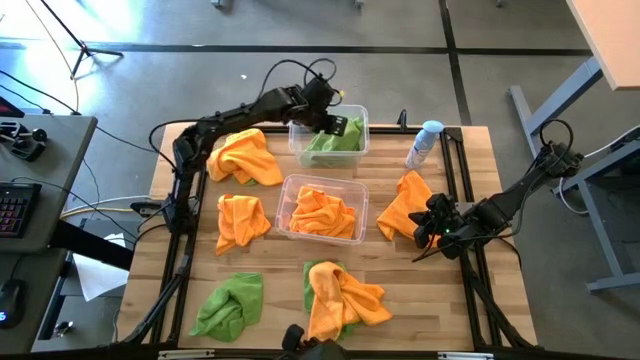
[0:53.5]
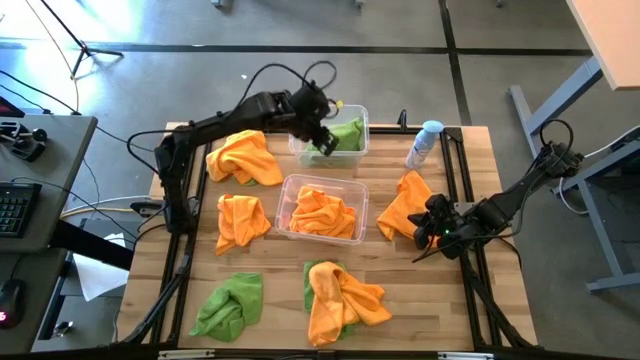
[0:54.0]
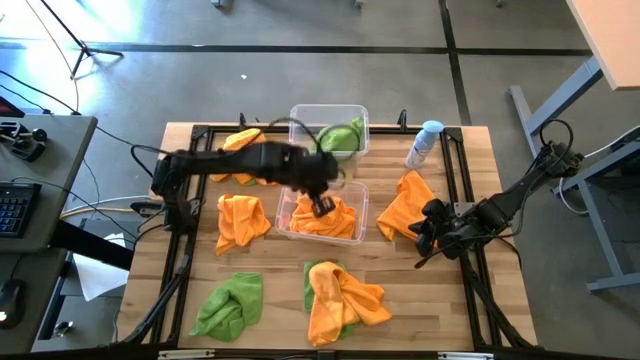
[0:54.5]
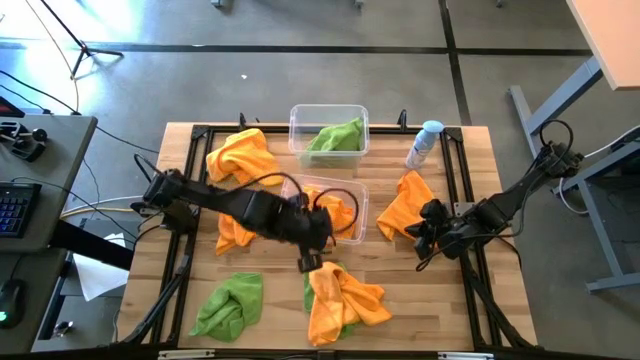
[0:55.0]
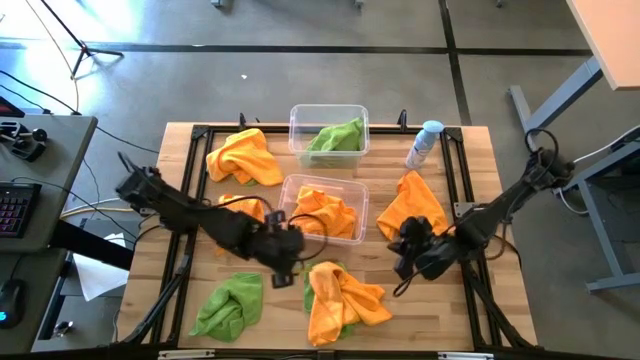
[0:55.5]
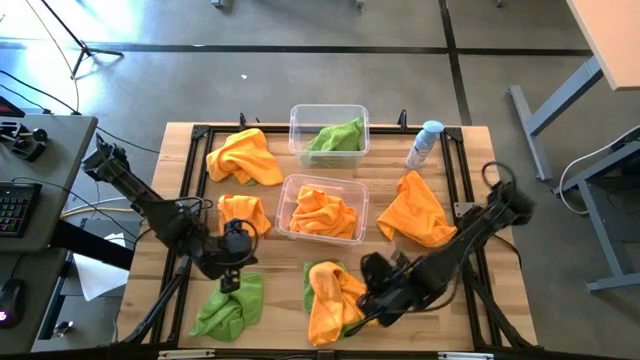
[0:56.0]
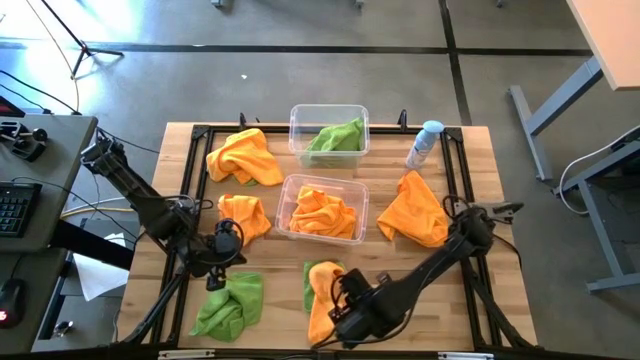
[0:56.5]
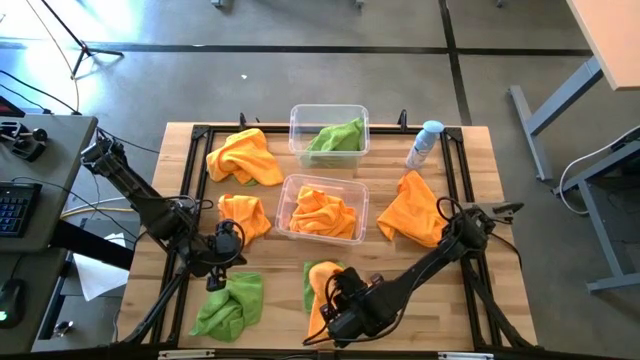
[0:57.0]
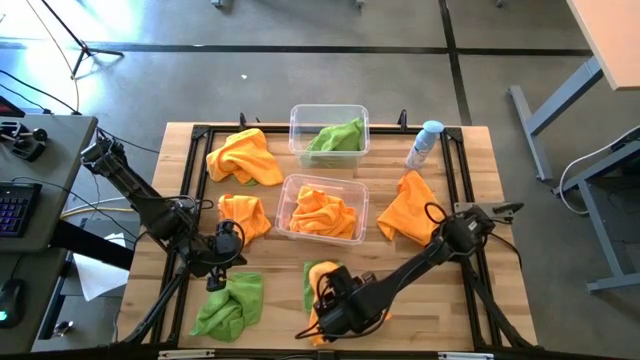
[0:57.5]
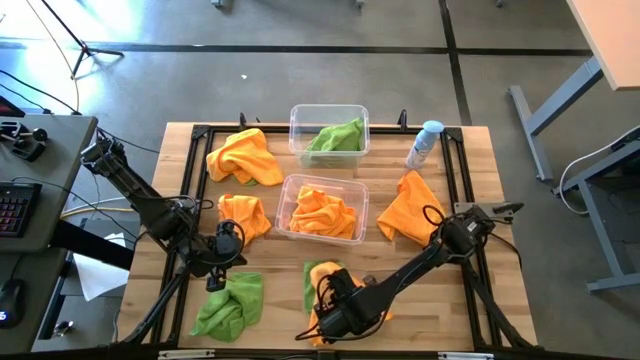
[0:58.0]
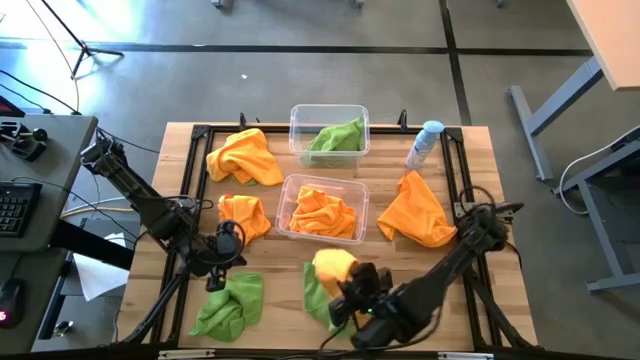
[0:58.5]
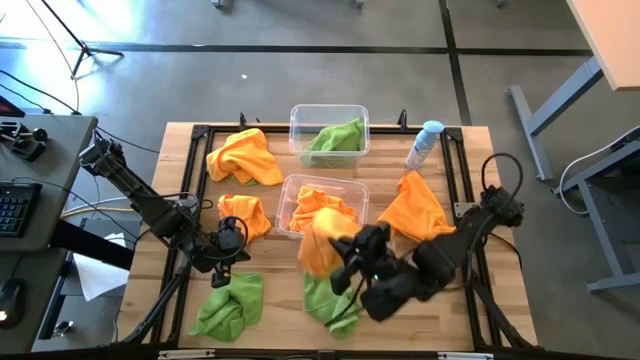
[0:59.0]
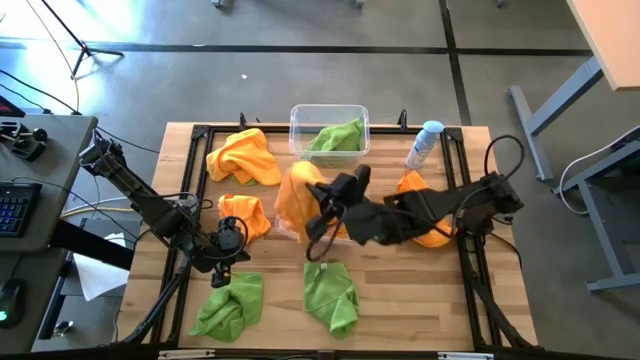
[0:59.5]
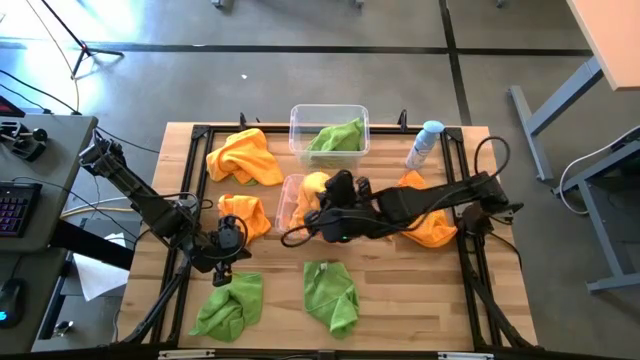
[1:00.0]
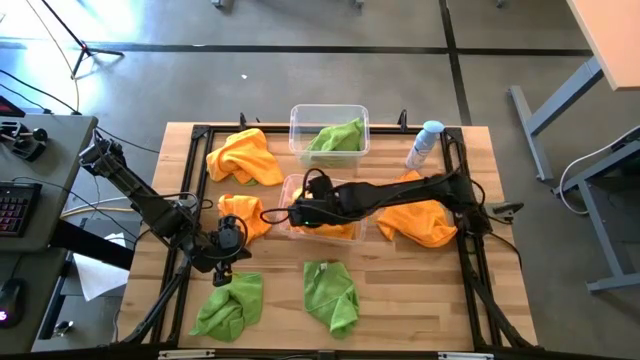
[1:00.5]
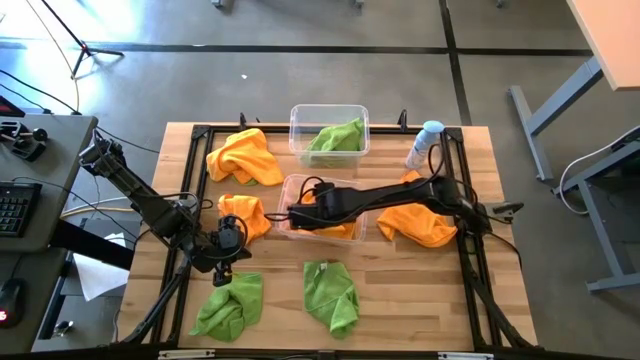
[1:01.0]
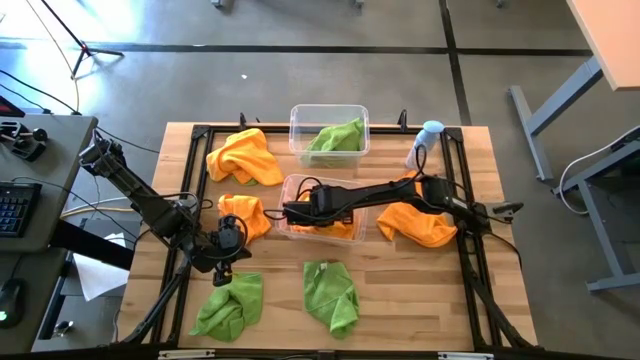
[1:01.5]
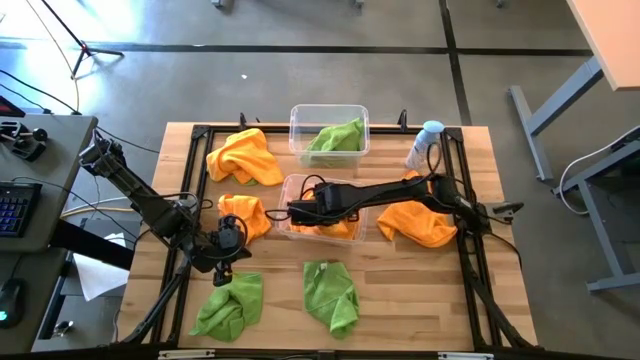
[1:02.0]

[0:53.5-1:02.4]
Task: Sort microfiber towel by color & place in baskets
Put the orange microfiber towel into the bottom transparent bin

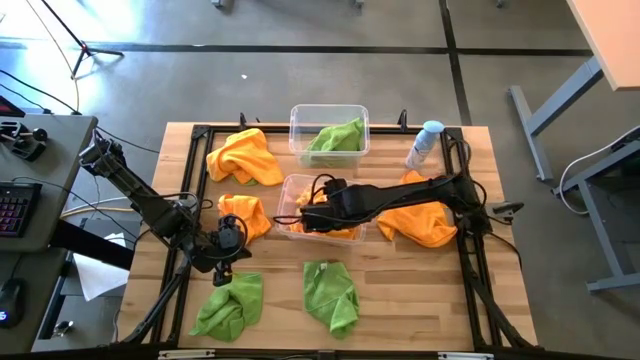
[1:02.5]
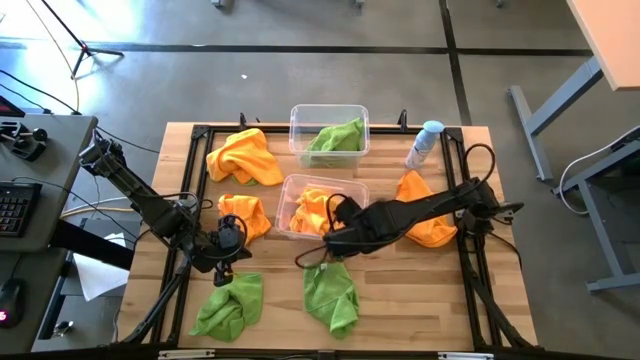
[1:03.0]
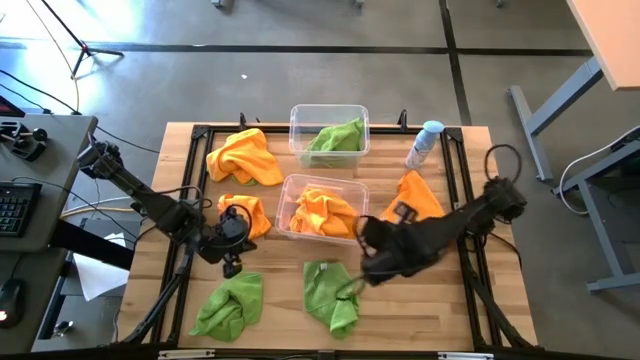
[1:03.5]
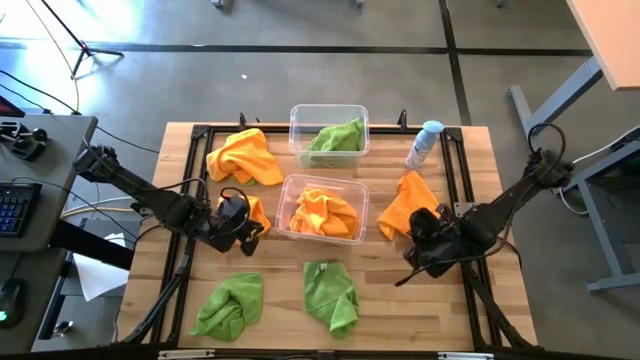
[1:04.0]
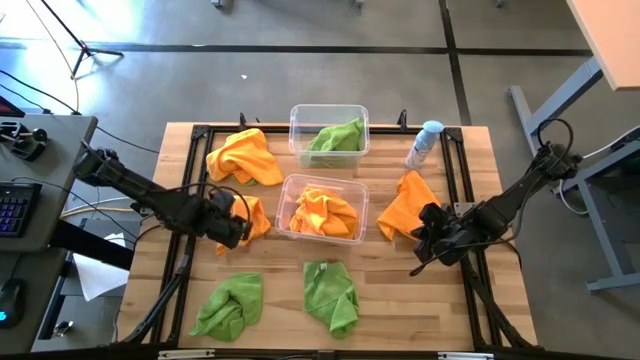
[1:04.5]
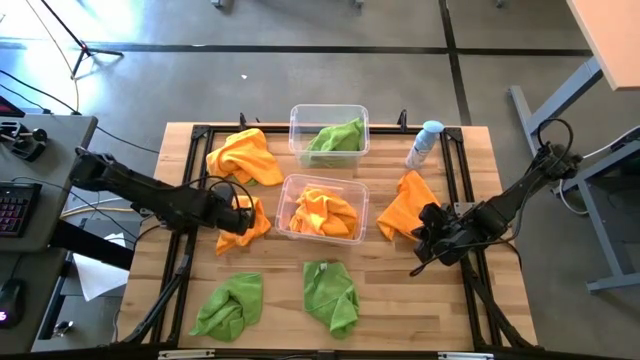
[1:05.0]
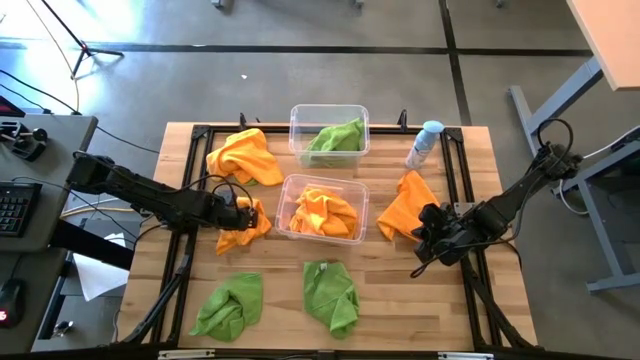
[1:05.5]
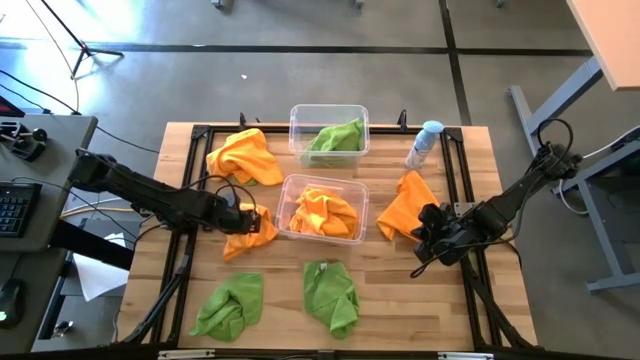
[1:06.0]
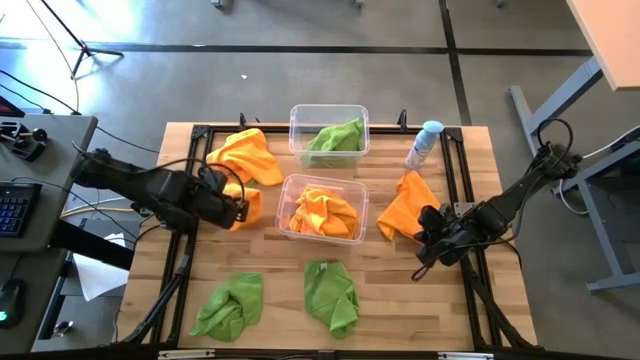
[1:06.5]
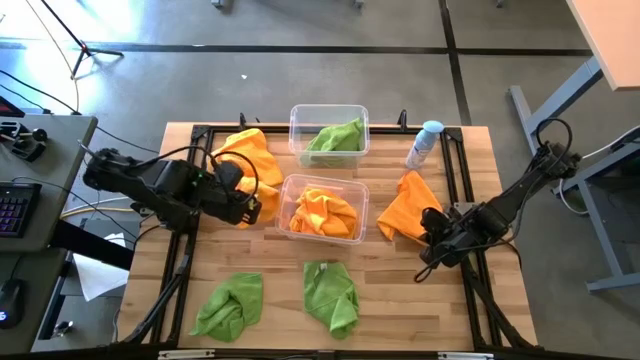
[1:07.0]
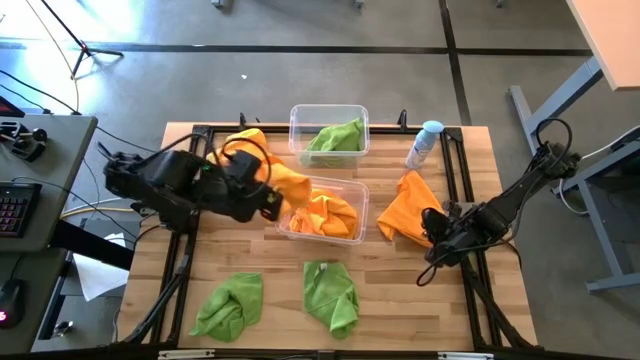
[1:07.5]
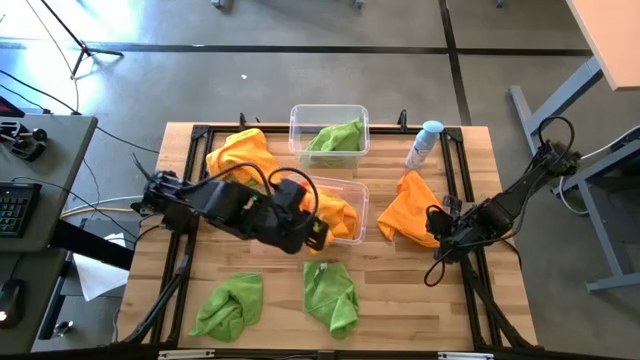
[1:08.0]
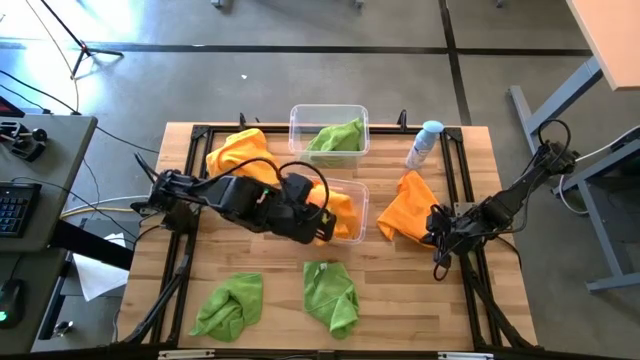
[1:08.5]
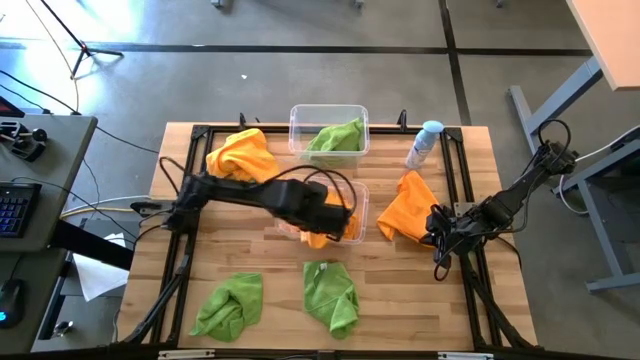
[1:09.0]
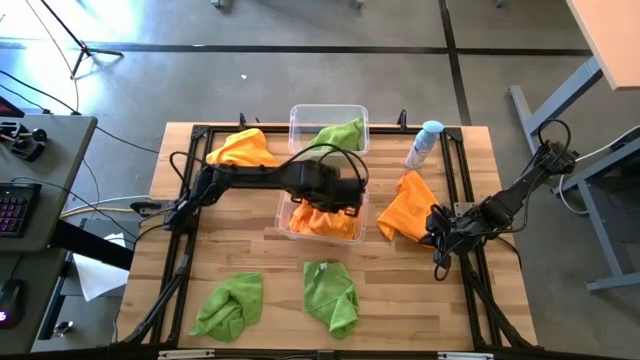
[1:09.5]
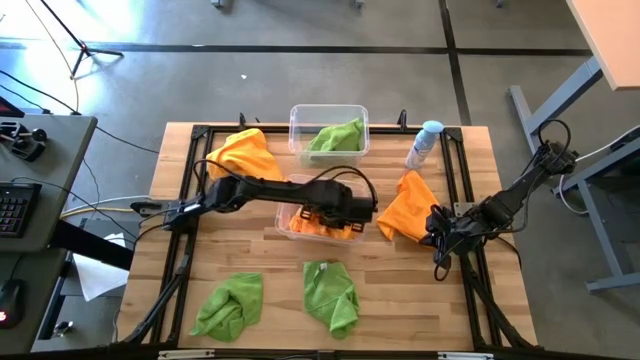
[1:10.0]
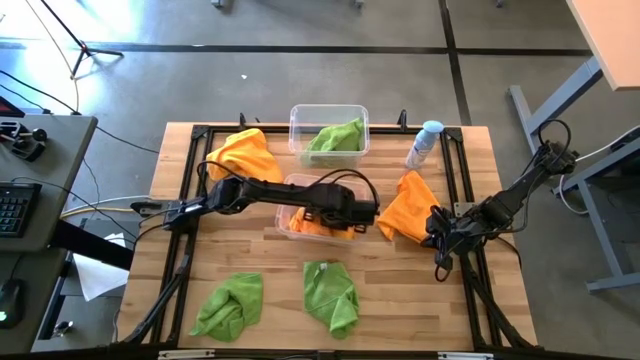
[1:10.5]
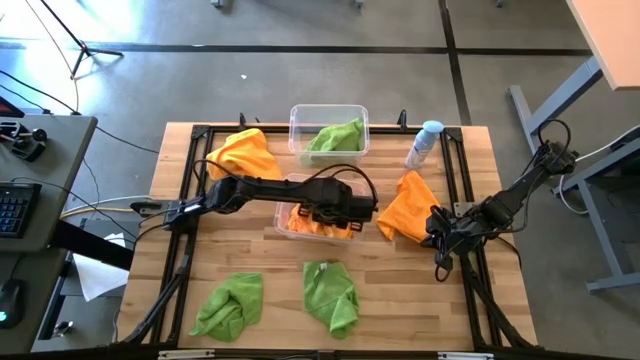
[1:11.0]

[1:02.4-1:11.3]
Put the orange microfiber towel into the bottom transparent bin

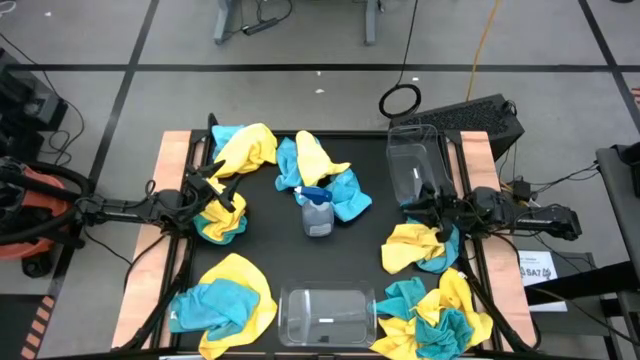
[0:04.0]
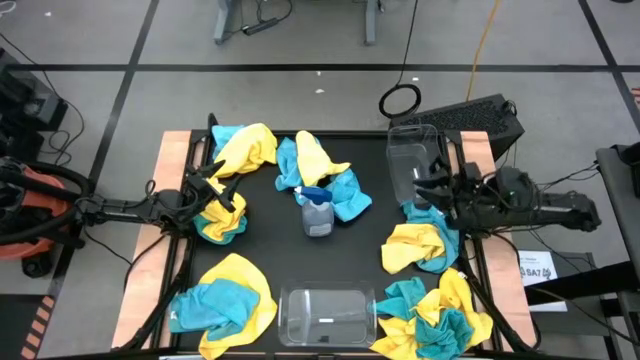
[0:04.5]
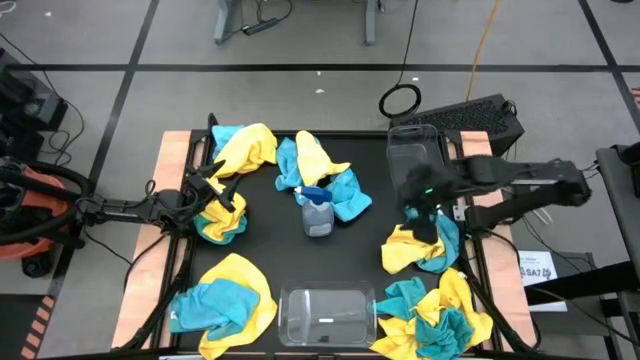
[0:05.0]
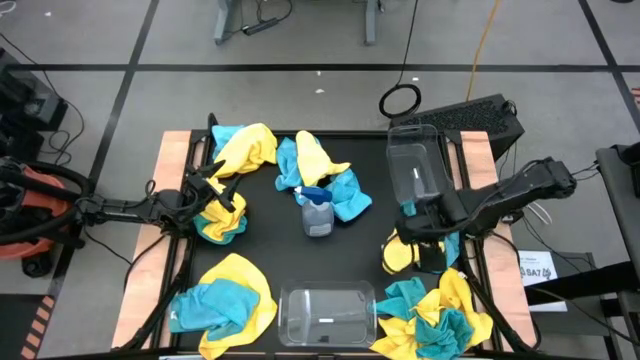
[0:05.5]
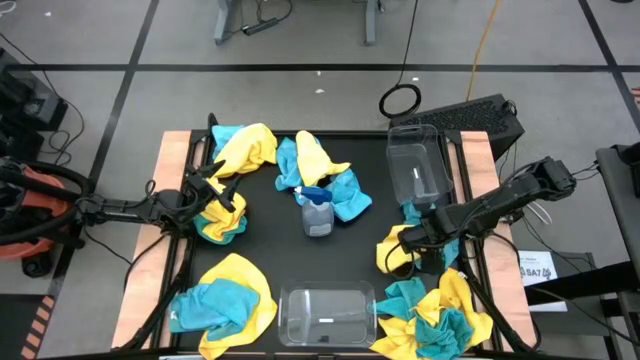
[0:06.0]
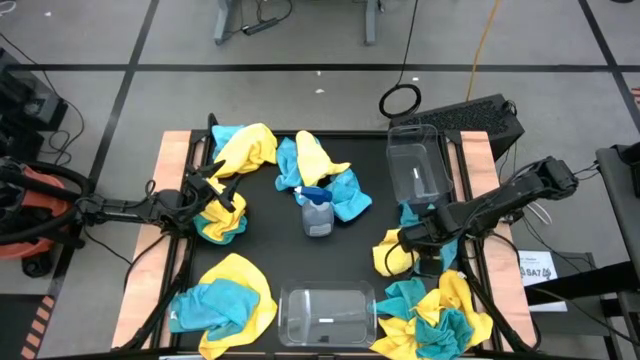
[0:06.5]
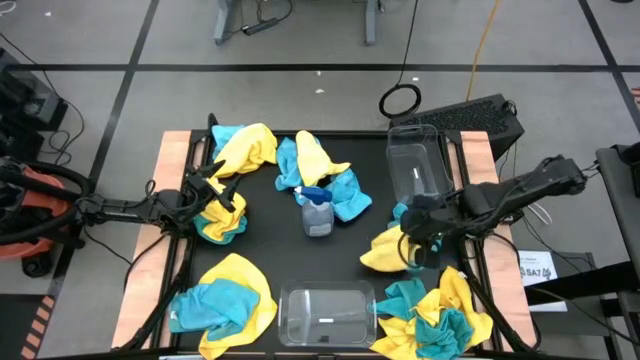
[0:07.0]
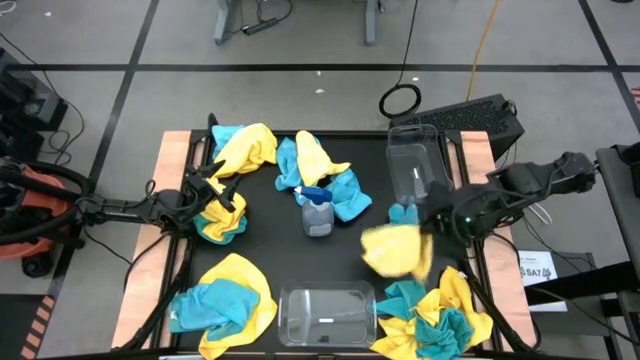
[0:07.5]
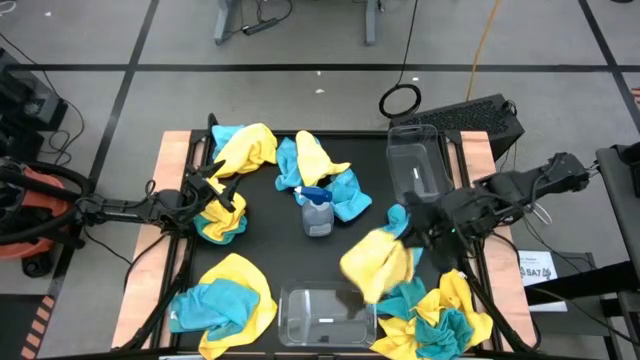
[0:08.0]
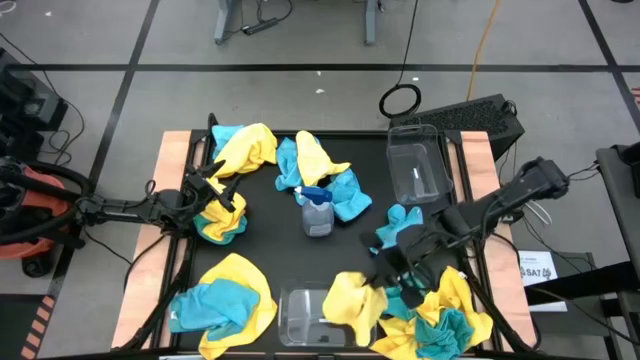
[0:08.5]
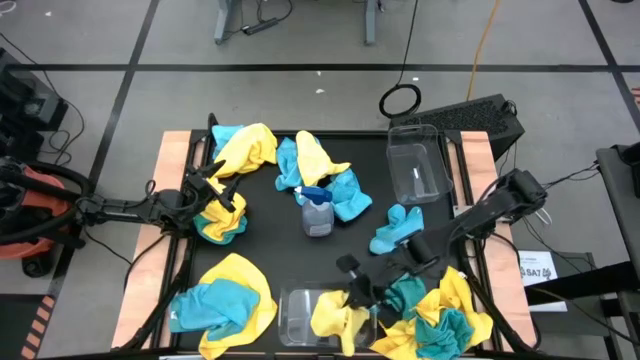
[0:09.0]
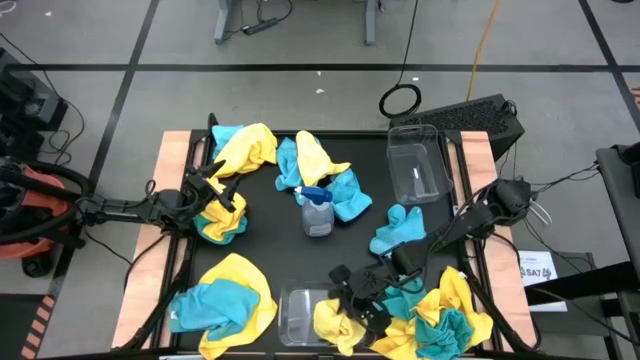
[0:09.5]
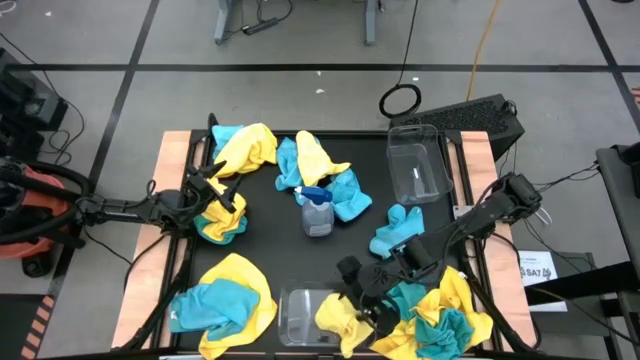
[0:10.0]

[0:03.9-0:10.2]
Task: Sort microfiber towel by color & place in baskets
Put the yellow towel into the bottom transparent bin
